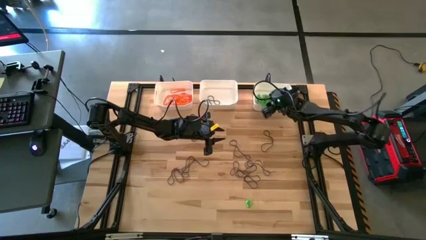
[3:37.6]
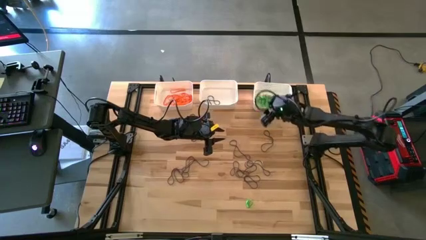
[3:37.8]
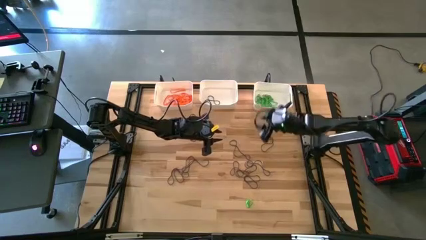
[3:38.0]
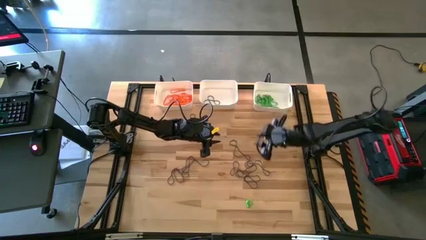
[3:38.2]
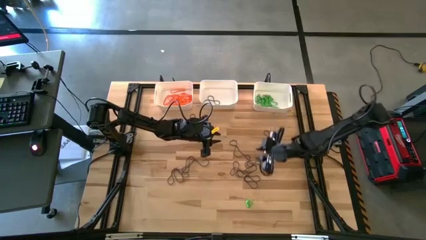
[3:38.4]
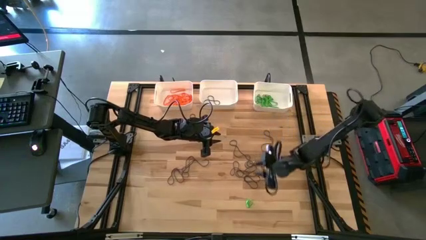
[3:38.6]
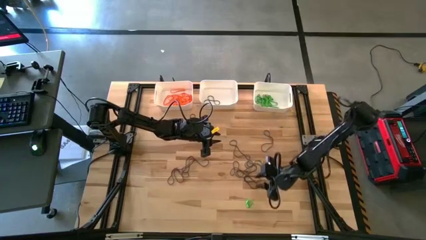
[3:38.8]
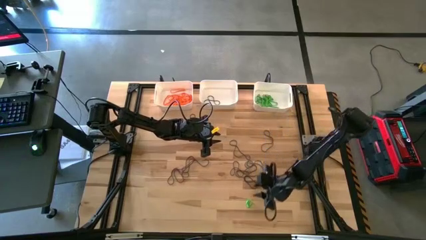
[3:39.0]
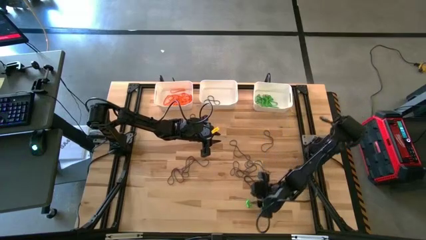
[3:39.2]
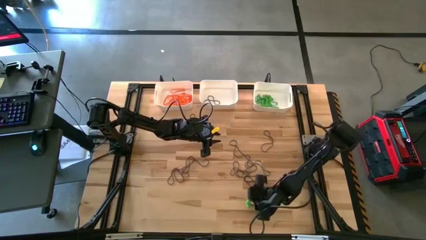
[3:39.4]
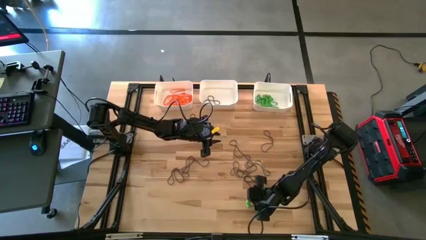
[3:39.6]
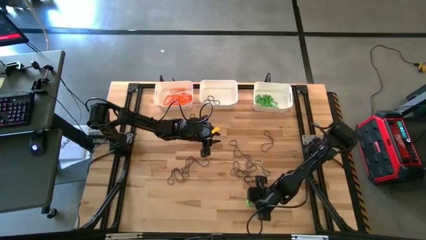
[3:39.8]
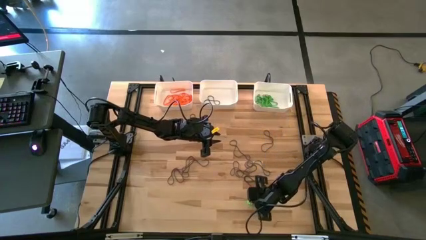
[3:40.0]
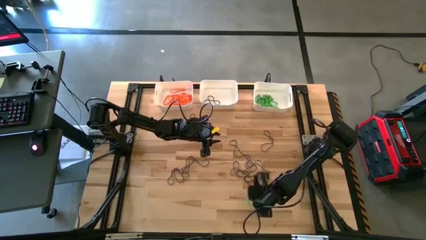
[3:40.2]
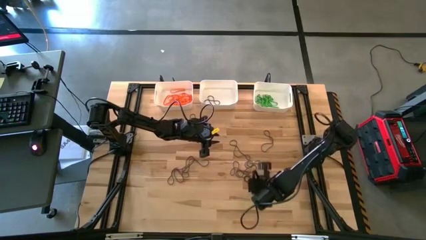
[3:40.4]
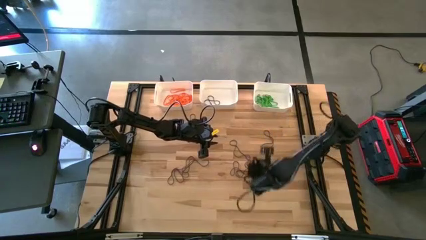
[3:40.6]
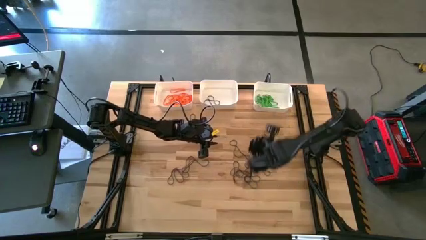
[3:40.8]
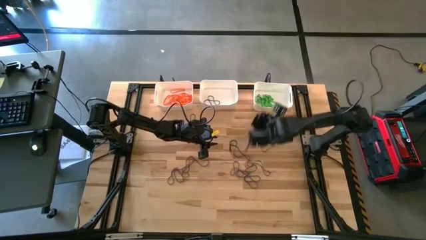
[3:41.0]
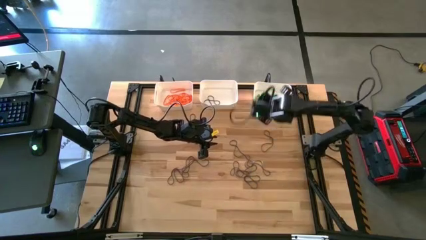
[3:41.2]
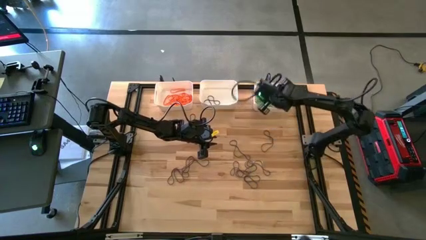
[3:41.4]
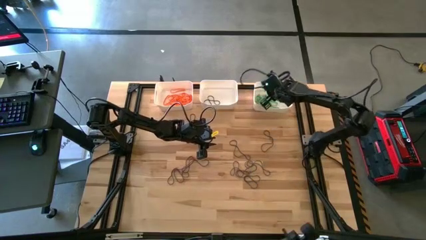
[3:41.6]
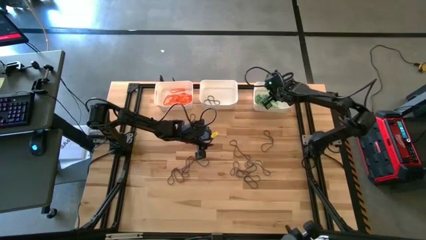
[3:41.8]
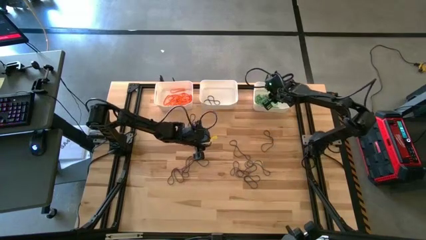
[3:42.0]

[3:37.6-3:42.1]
Task: Sort rubber bands into baskets
Put the green rubber band into the right white bin

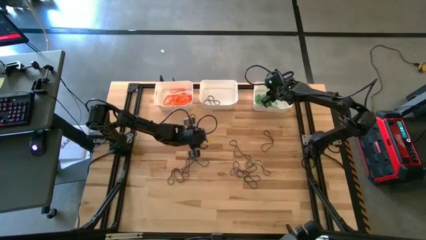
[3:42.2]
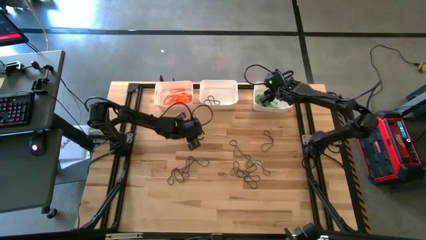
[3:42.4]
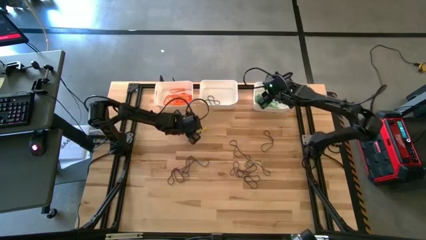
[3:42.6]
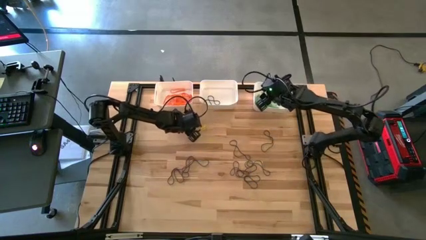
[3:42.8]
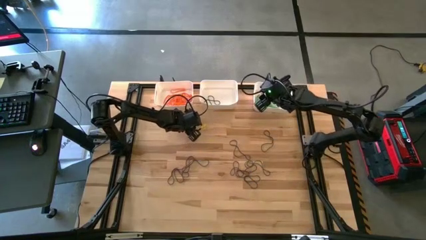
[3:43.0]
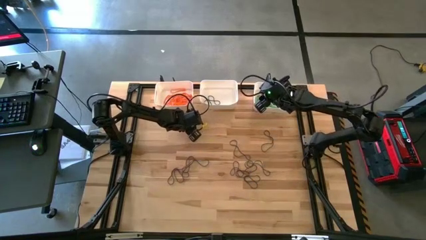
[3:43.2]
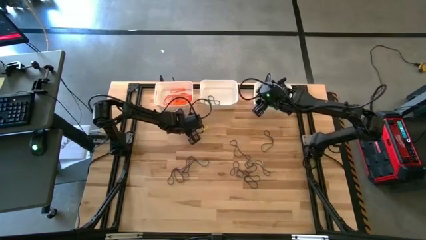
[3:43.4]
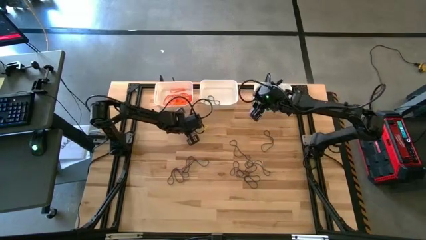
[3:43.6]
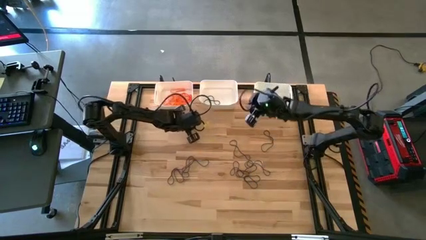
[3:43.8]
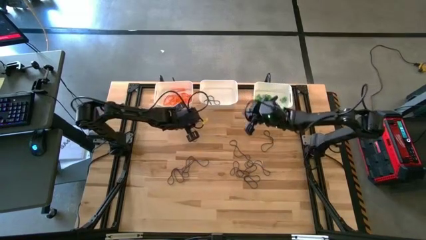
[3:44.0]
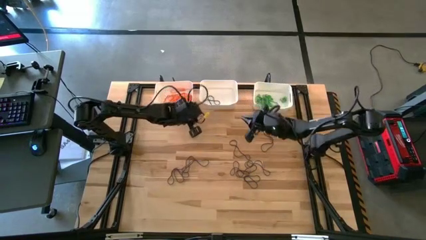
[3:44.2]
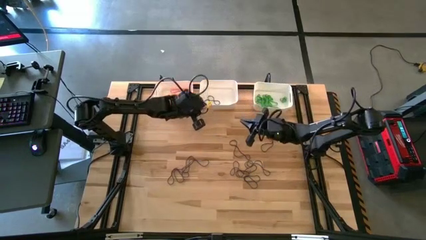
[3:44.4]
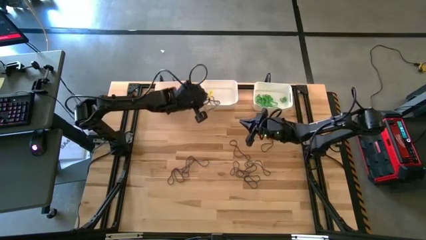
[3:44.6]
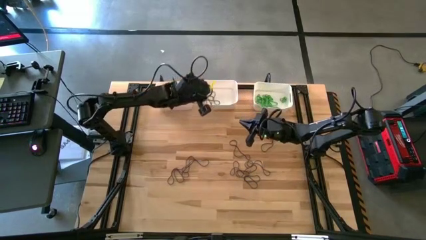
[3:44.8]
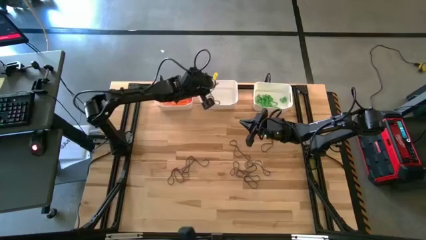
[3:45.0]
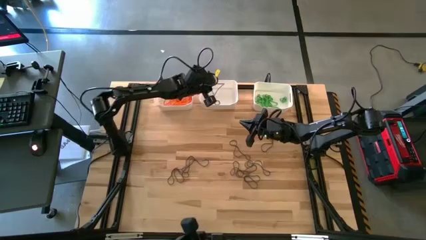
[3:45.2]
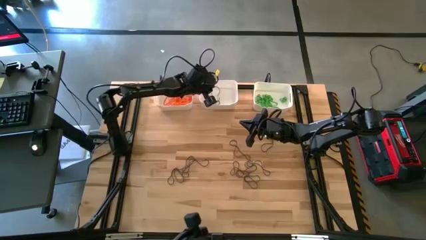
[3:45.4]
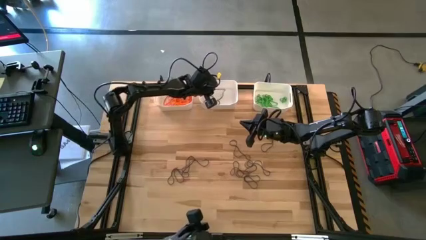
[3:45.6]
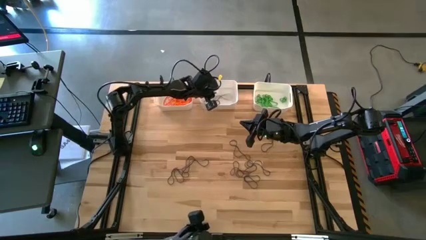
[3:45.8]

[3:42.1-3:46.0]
Put the purple rubber band into the middle white bin

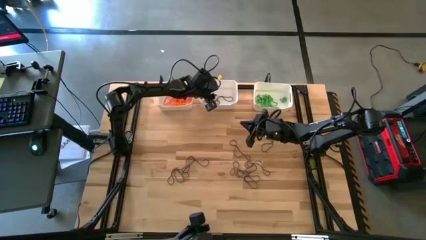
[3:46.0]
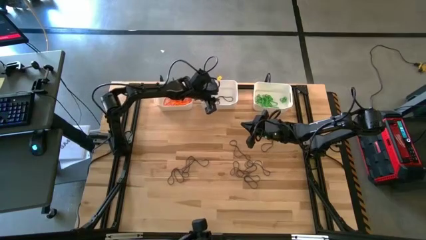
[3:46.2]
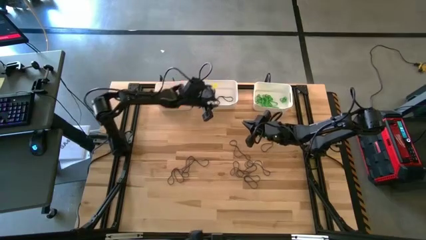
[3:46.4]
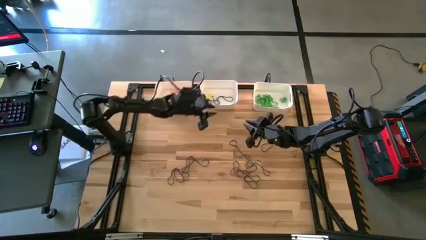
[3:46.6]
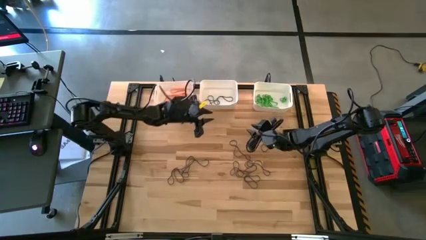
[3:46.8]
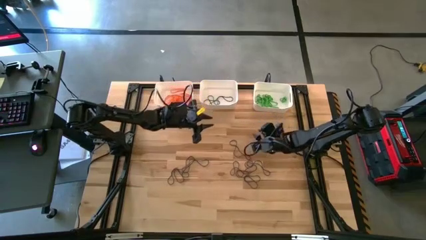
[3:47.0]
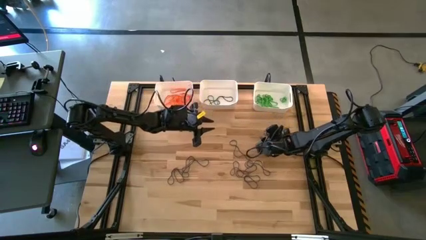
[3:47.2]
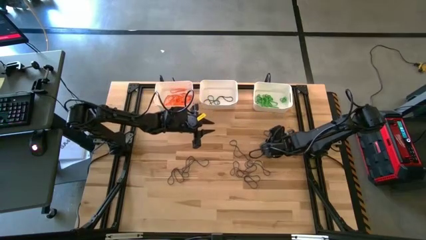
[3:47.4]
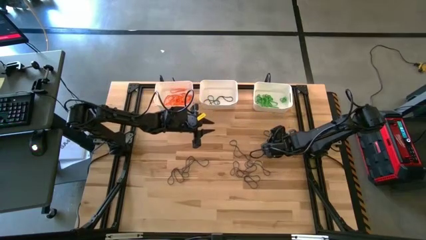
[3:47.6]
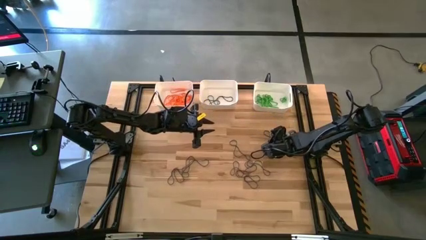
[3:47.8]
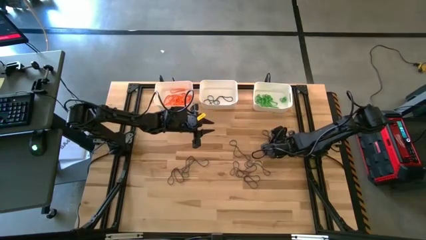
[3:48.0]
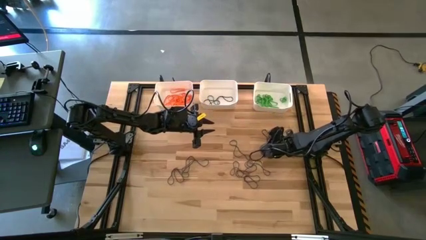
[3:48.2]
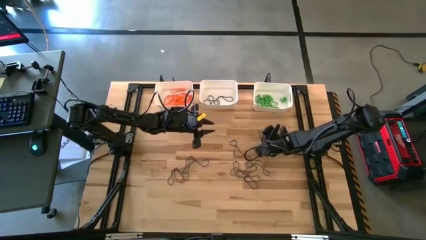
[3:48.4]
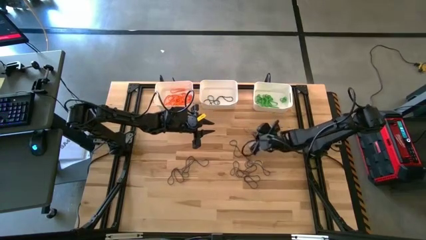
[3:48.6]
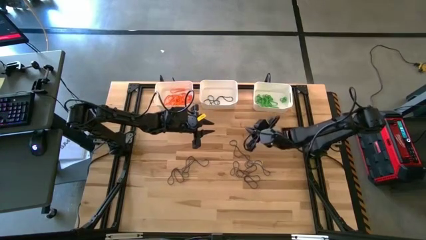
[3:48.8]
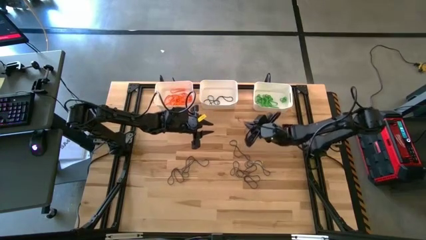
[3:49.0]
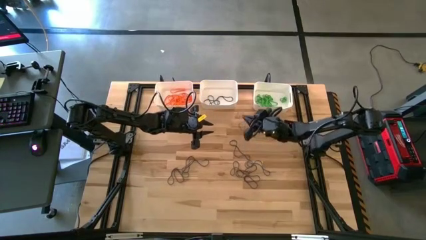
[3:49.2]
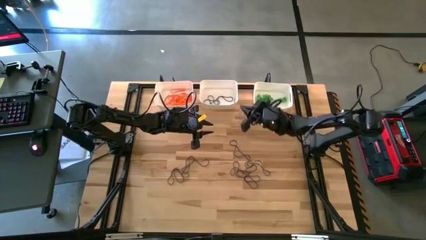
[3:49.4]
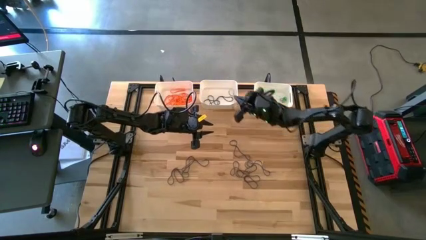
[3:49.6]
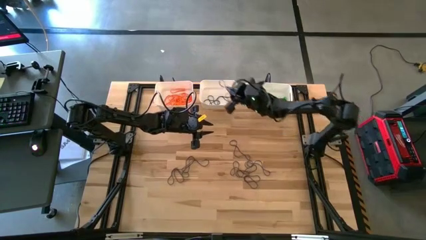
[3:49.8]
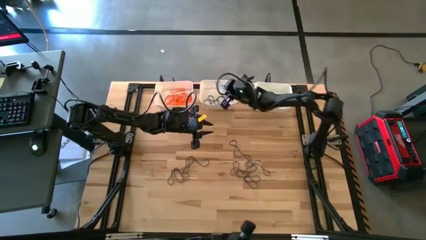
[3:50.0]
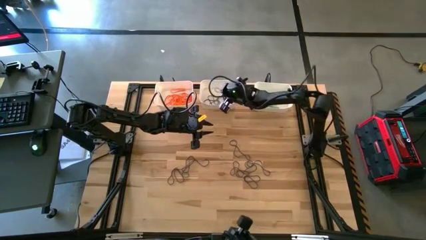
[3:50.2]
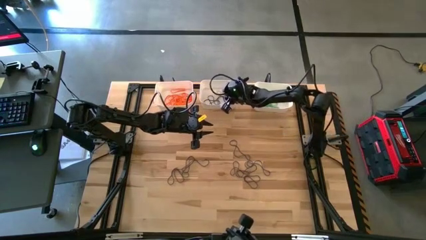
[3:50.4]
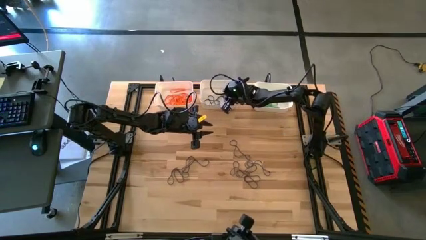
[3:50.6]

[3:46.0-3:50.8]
Put the purple rubber band into the middle white bin

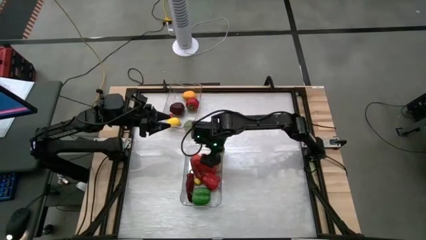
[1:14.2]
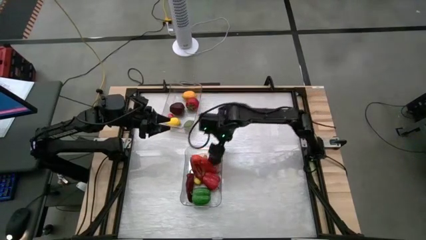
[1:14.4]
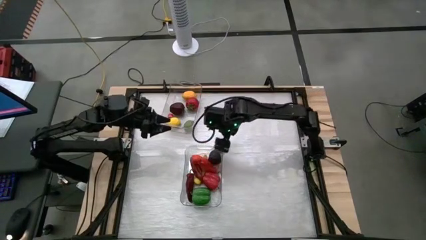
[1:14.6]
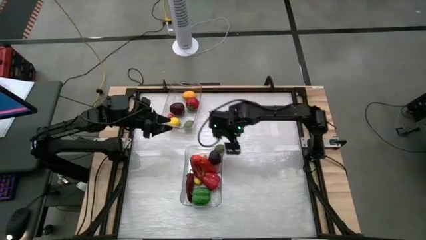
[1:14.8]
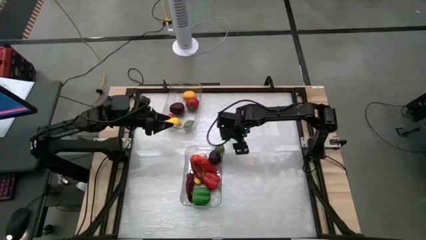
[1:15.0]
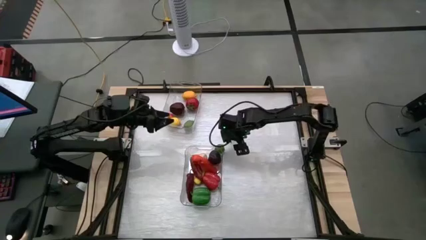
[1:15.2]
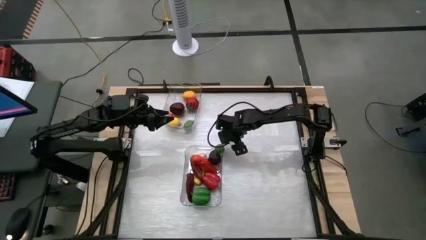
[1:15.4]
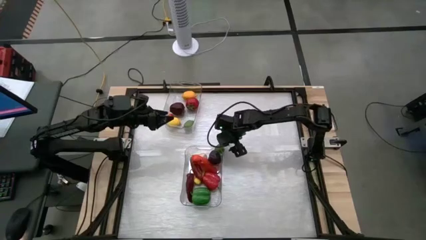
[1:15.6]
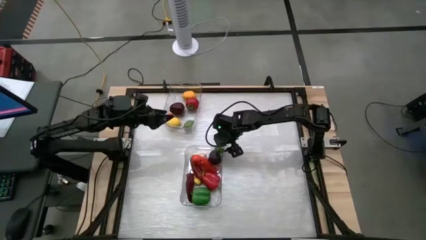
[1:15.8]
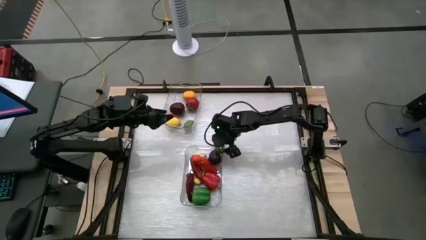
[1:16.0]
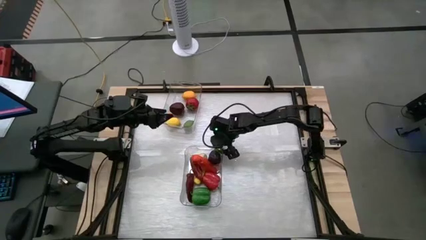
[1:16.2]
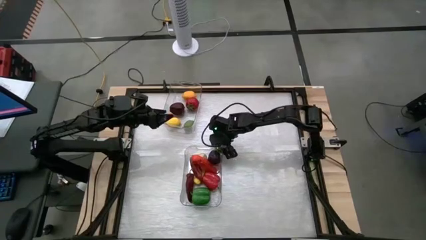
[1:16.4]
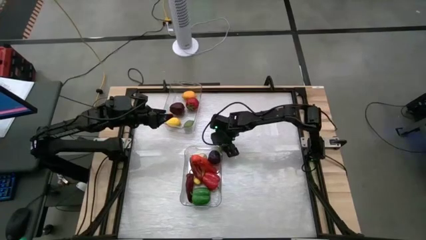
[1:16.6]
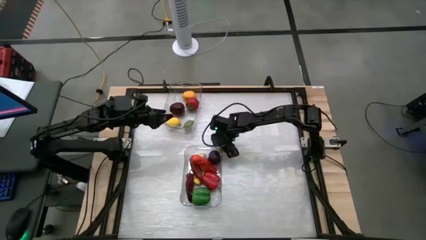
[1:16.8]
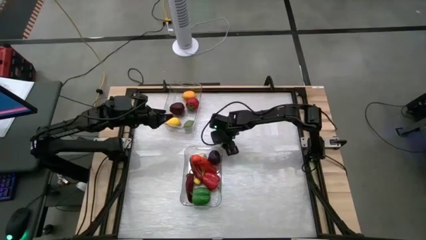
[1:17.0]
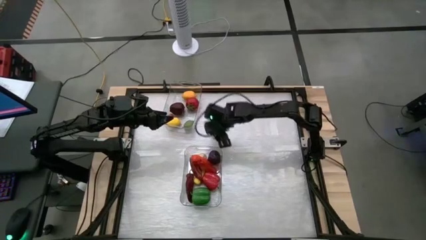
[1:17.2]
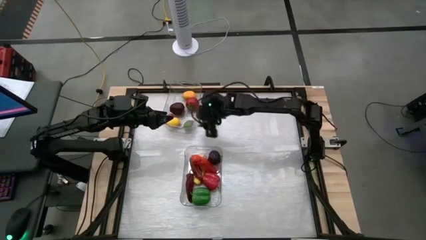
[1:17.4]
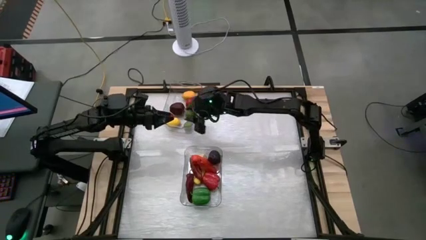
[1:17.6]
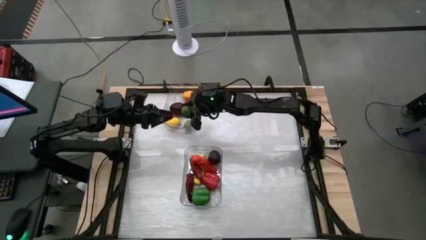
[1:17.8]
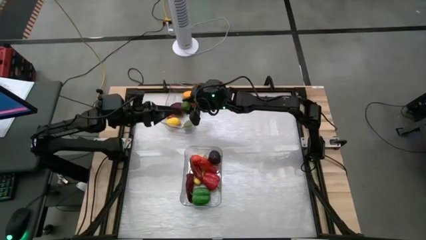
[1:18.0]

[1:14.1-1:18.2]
Task: Sort produce into baskets
Put the green lime into the top transparent bin
